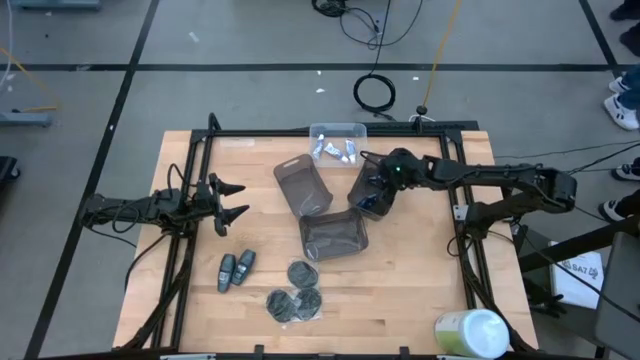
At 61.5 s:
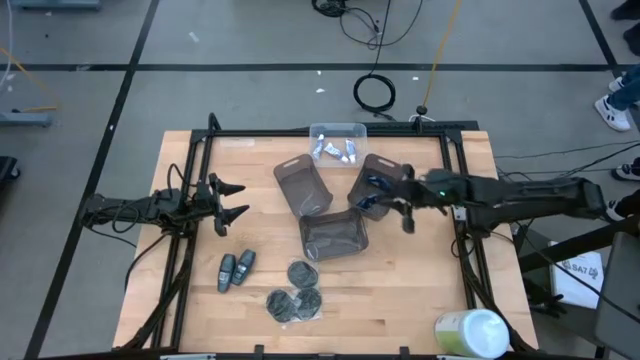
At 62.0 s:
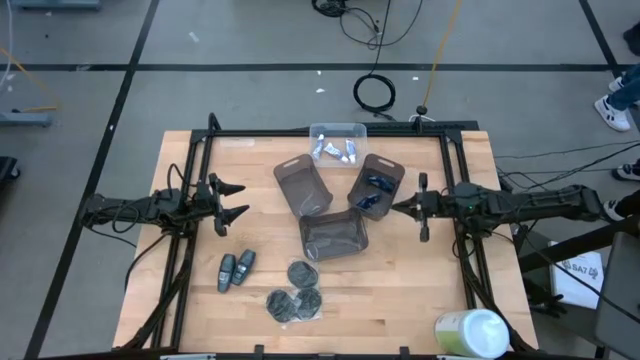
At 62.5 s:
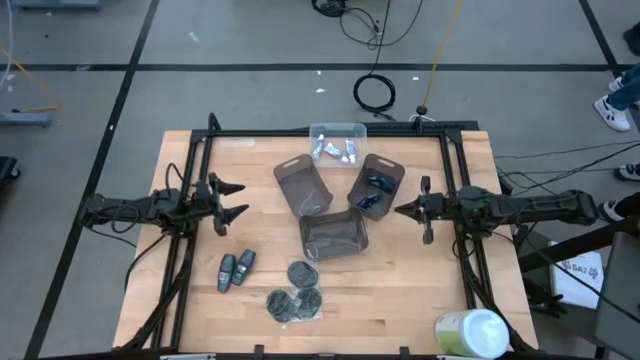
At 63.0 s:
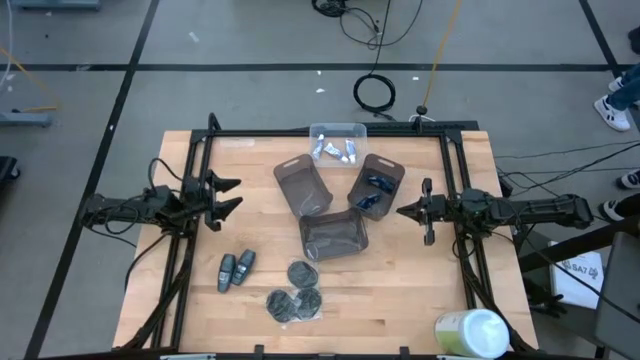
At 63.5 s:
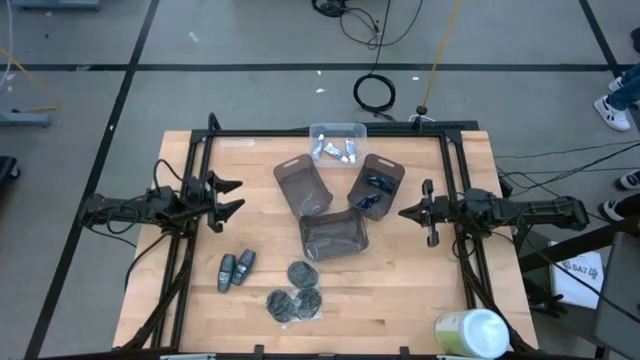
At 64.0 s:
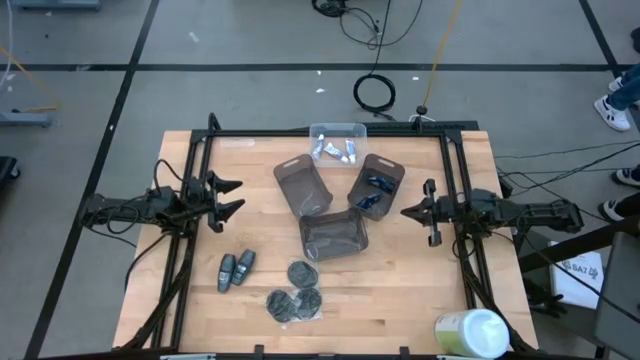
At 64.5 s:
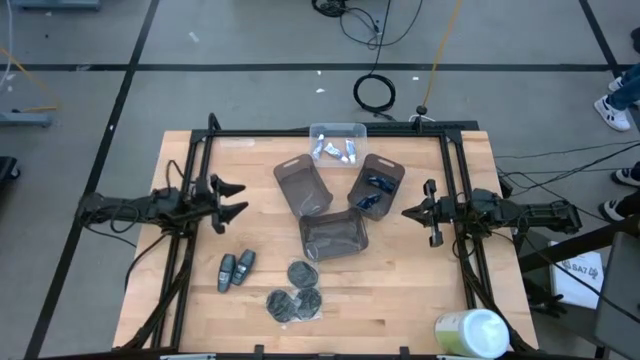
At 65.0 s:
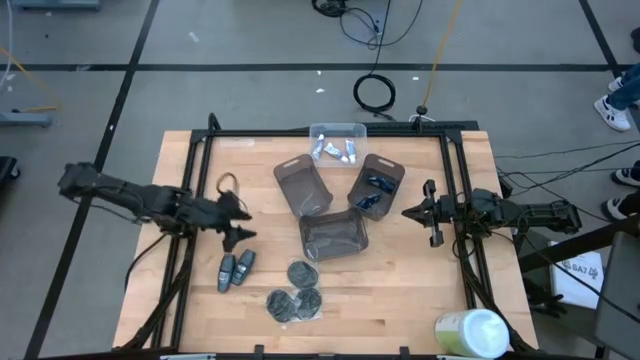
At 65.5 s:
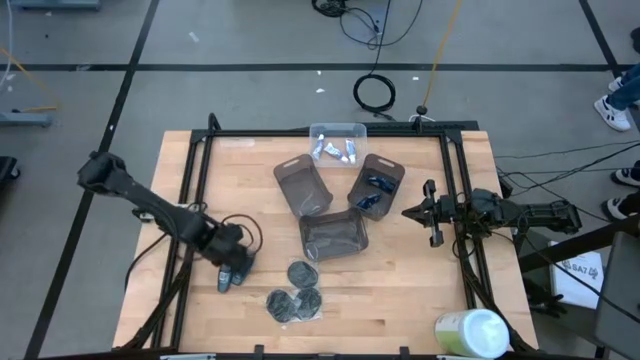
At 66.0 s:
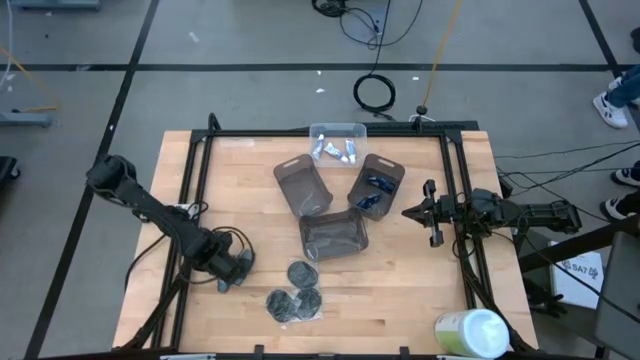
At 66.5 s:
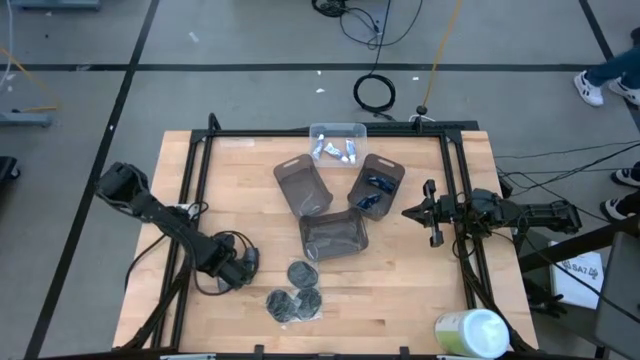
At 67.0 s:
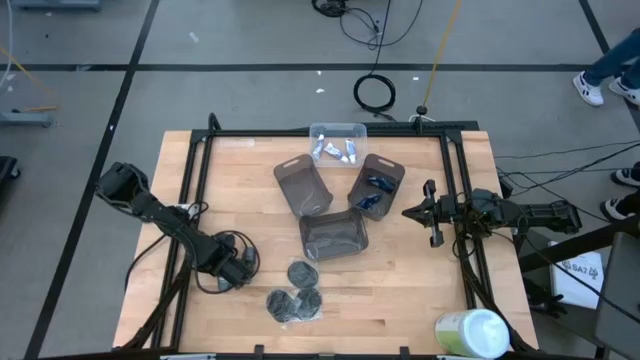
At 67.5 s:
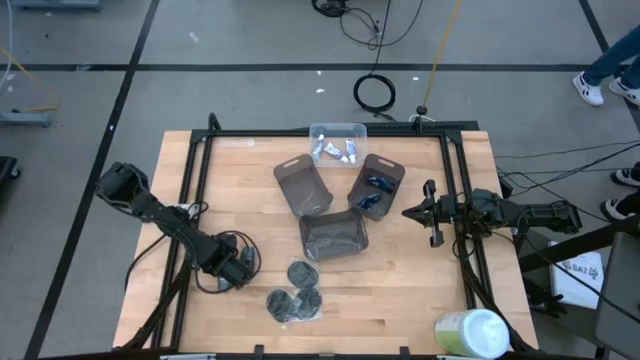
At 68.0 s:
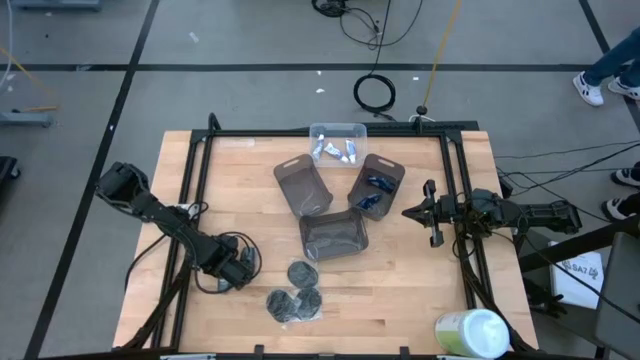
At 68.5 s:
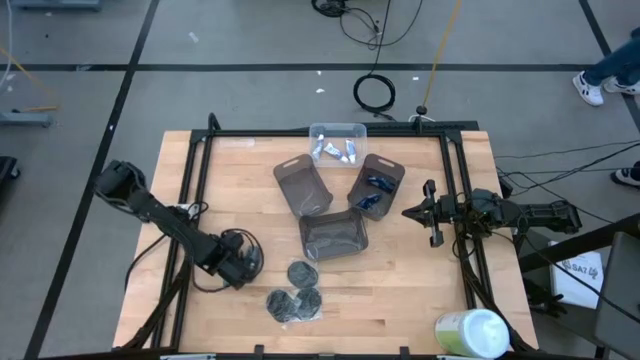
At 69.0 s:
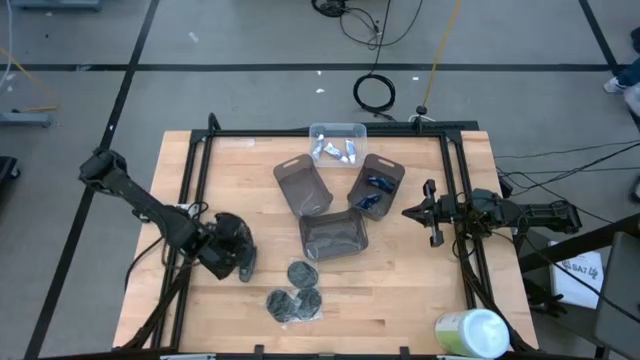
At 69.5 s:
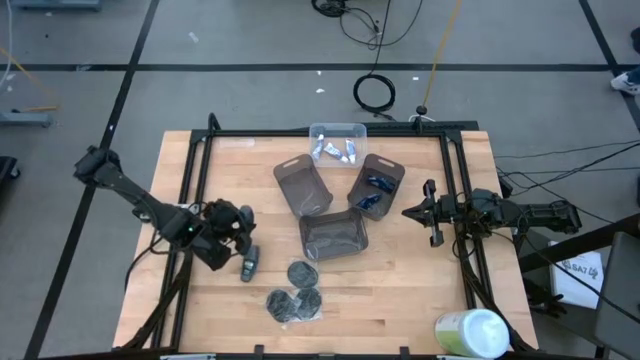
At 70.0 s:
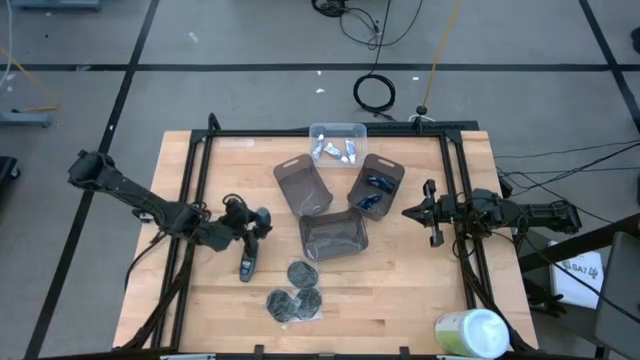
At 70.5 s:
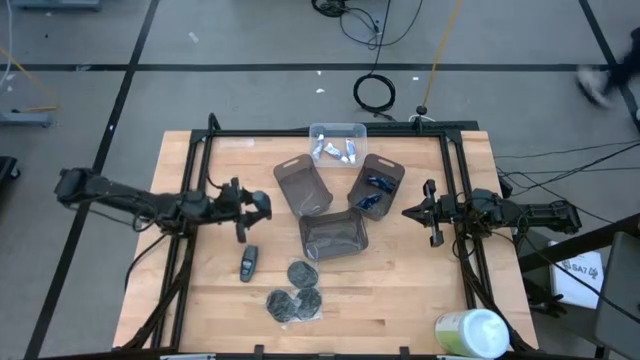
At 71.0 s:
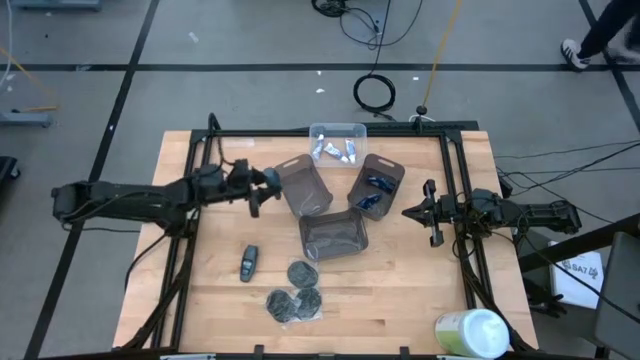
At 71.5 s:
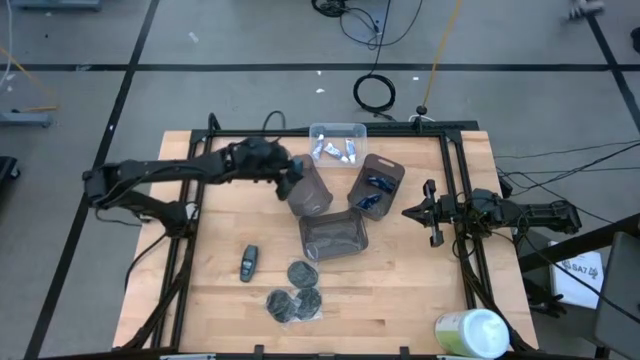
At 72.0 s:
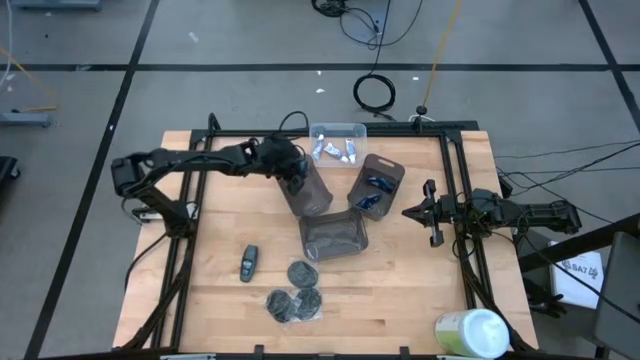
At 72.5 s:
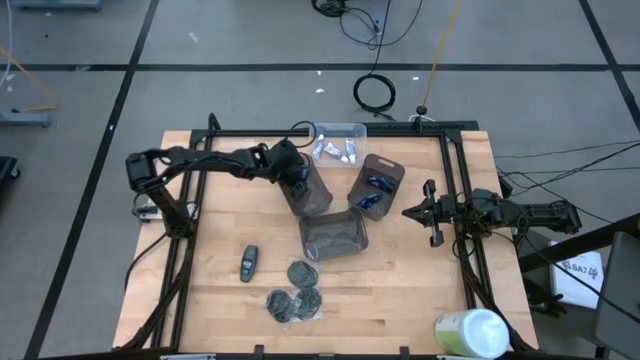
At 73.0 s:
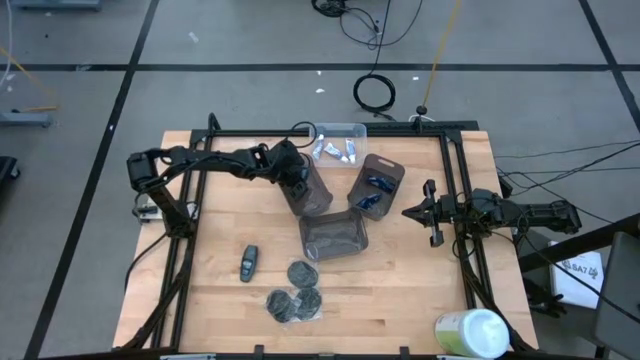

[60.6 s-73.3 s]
Task: Pick & Place Travel size toiletries
Put the left gray deodorant into the top left black transparent bin

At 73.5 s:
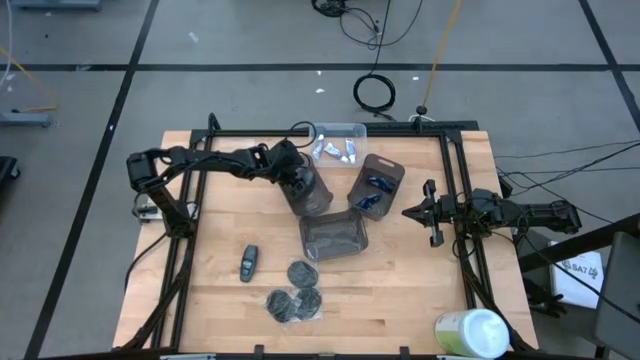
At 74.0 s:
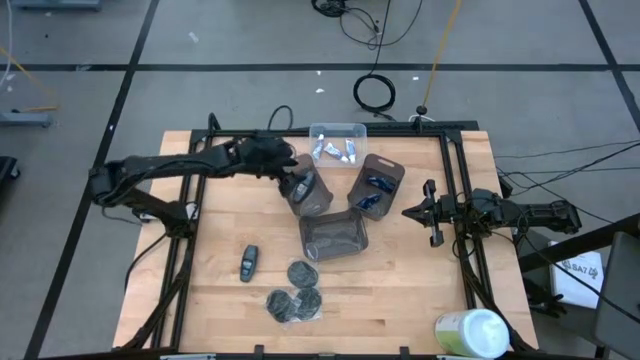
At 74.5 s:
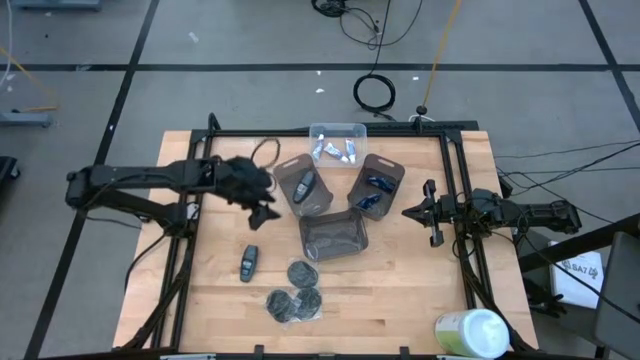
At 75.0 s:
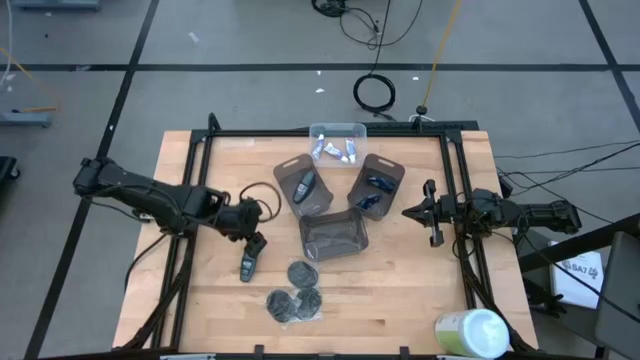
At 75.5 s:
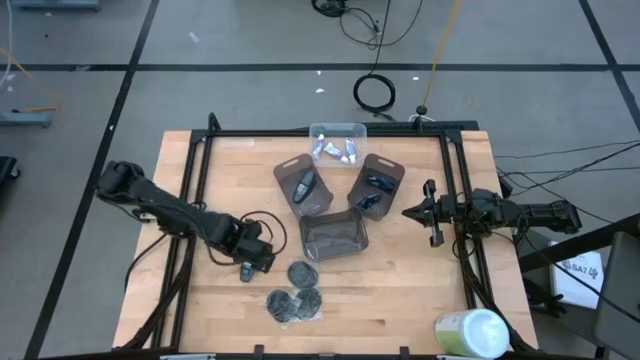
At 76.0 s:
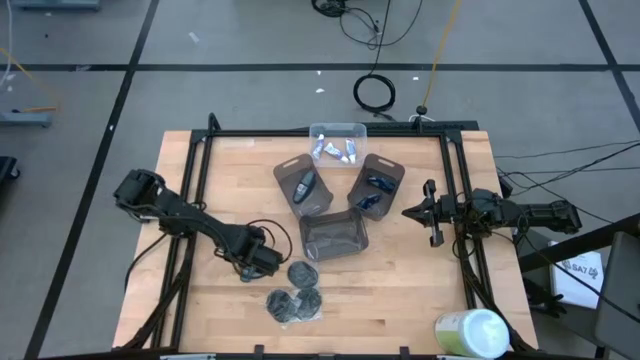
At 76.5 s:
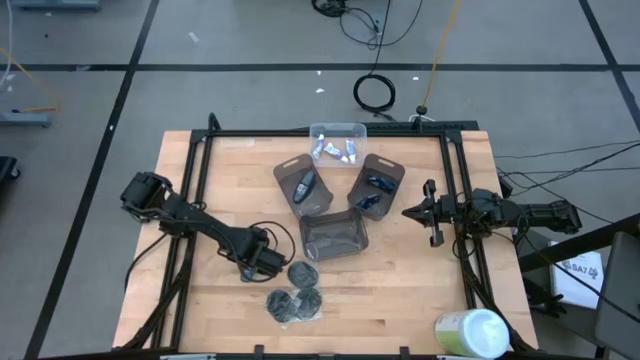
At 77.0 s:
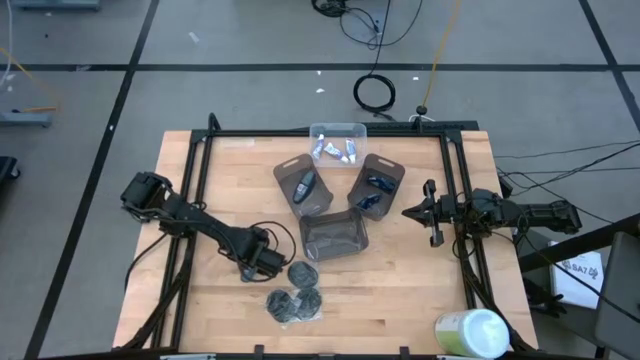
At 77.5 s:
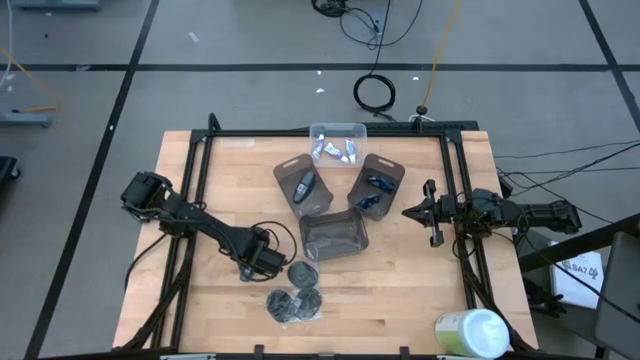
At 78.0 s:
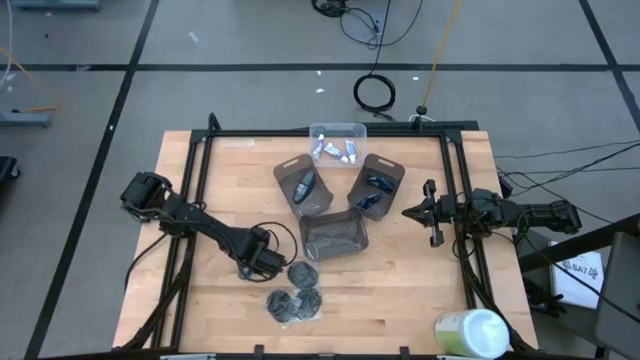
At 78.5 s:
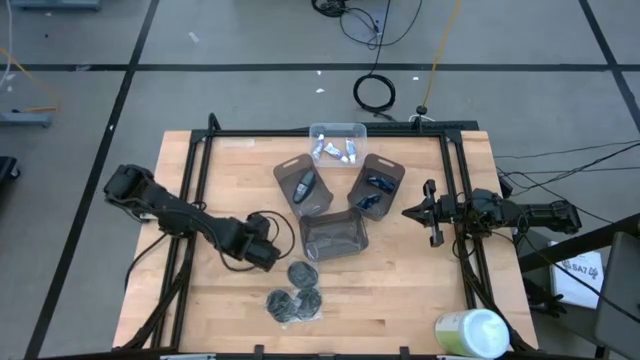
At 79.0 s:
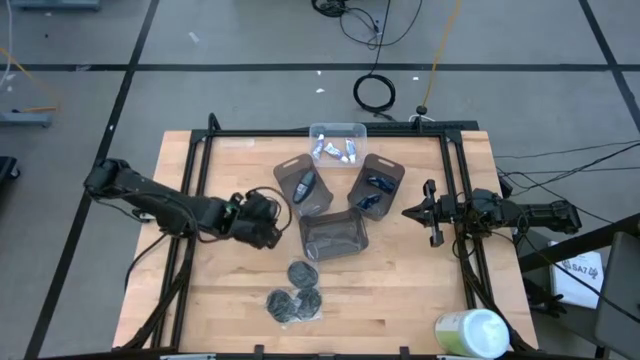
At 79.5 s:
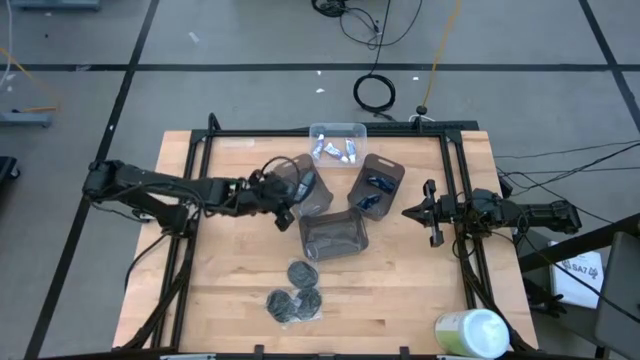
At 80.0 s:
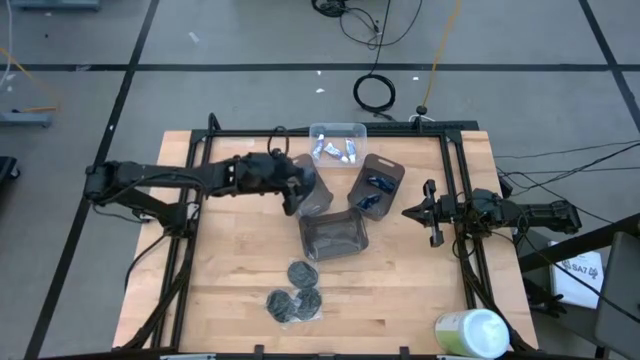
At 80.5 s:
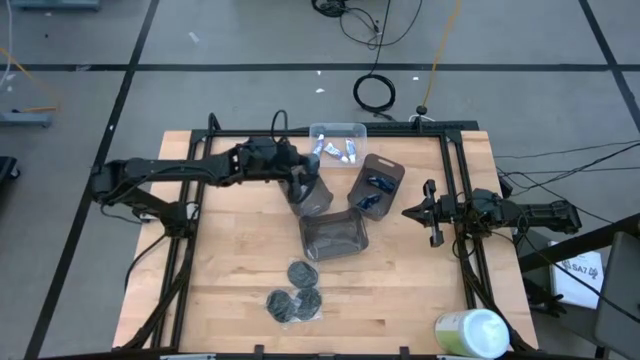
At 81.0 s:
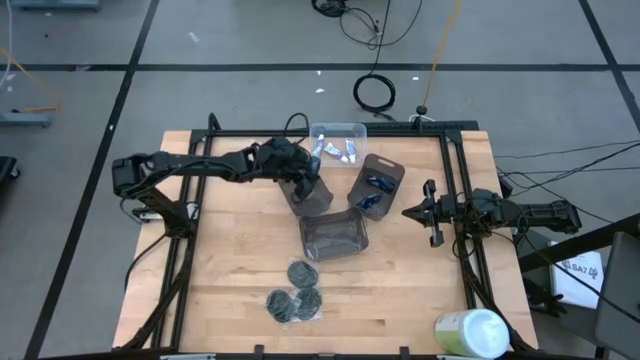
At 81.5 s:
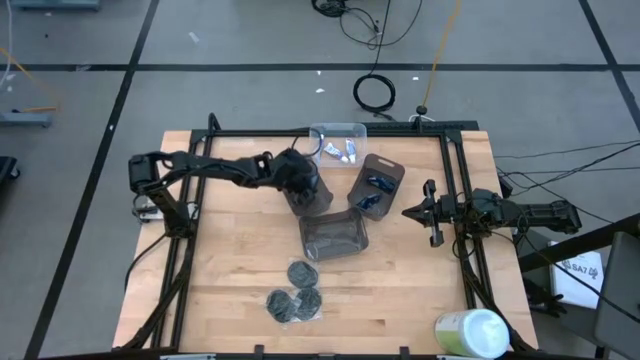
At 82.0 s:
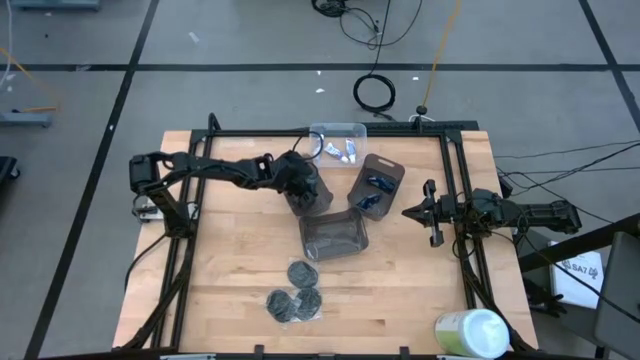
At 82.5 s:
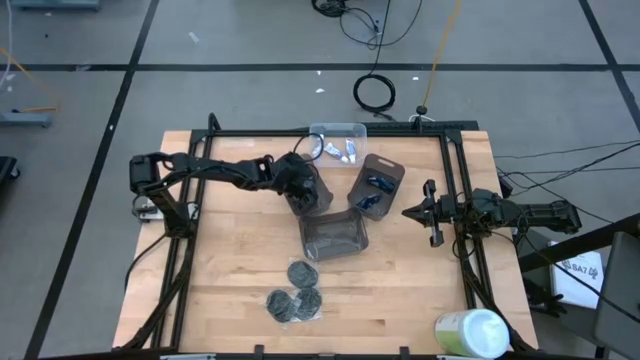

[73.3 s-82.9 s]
Put the gray deodorant into the top left black transparent bin
